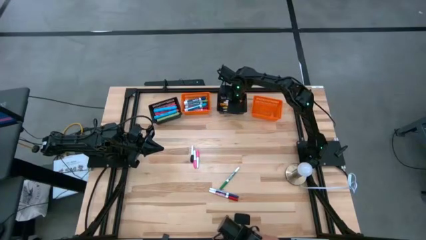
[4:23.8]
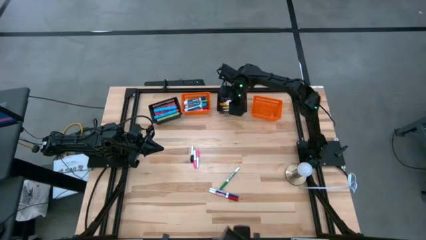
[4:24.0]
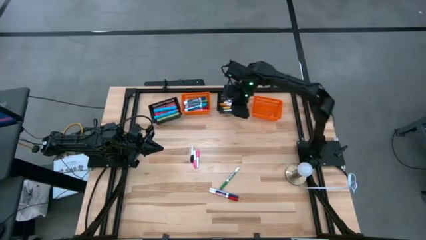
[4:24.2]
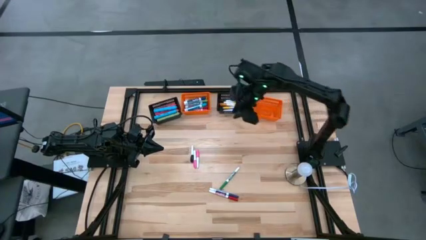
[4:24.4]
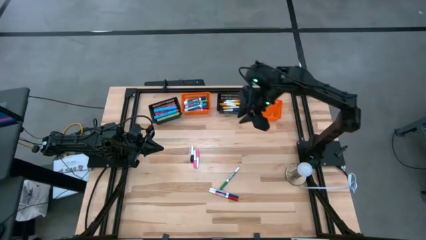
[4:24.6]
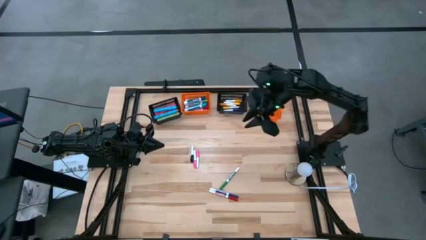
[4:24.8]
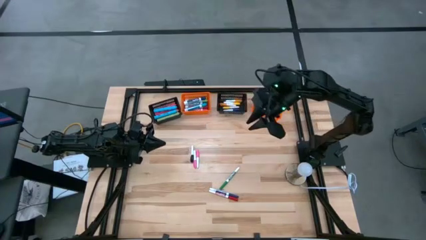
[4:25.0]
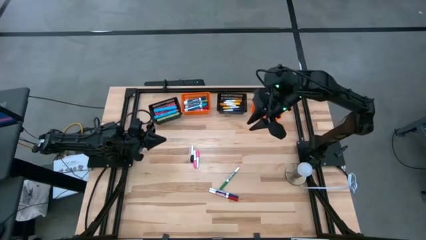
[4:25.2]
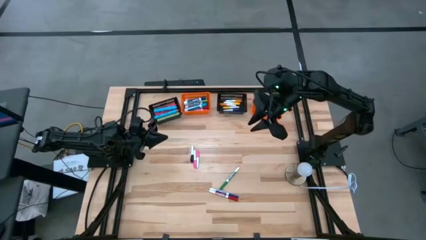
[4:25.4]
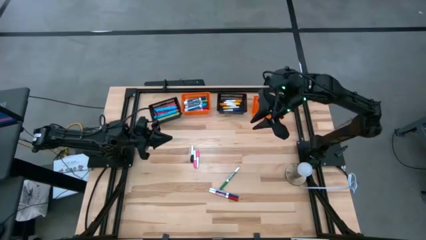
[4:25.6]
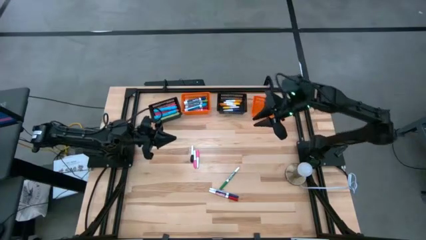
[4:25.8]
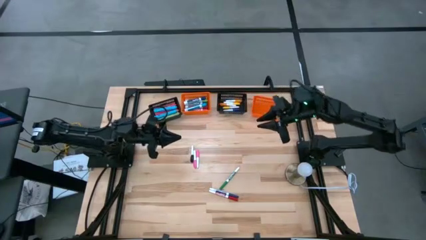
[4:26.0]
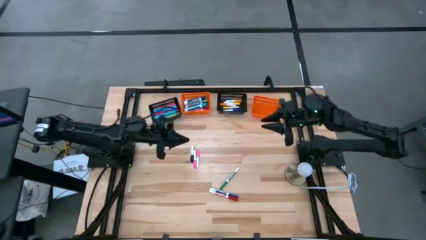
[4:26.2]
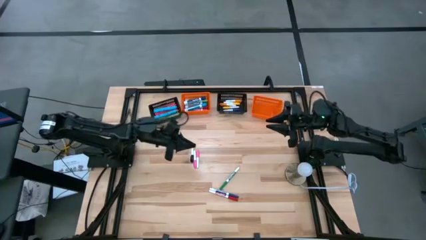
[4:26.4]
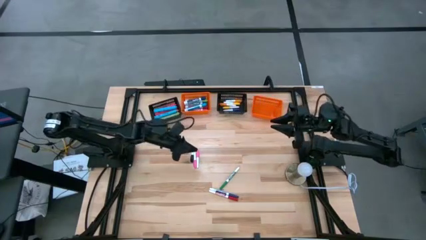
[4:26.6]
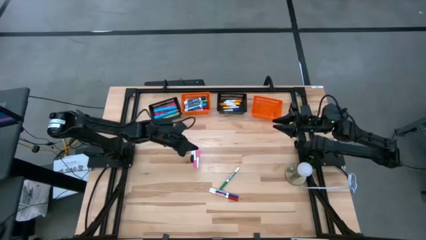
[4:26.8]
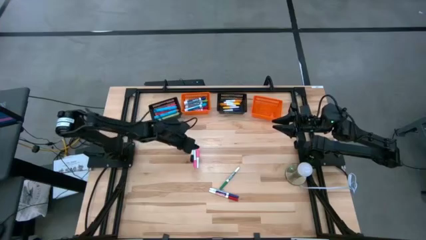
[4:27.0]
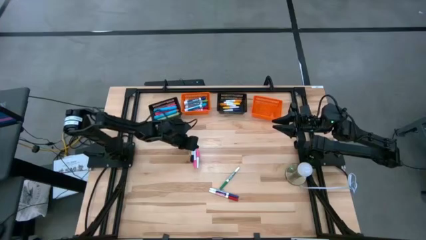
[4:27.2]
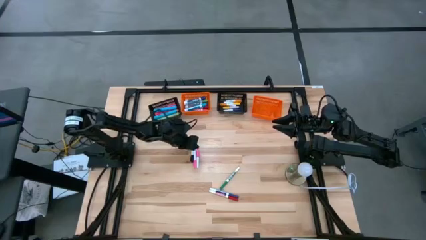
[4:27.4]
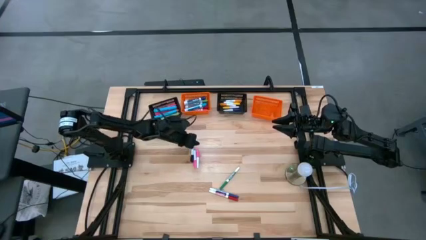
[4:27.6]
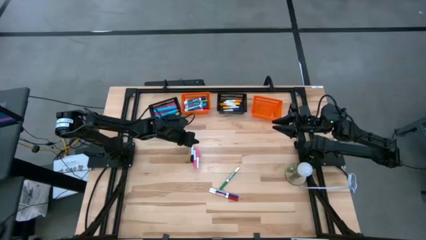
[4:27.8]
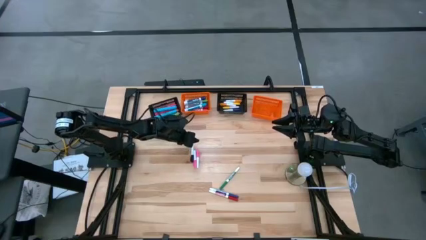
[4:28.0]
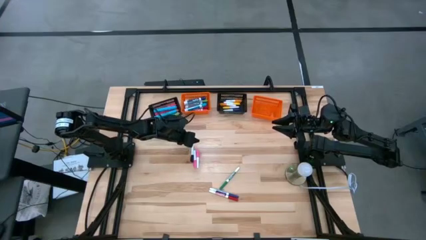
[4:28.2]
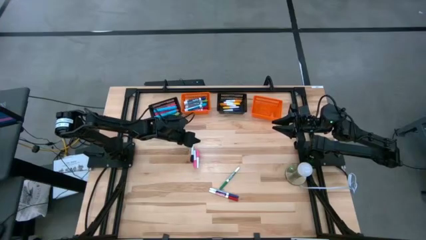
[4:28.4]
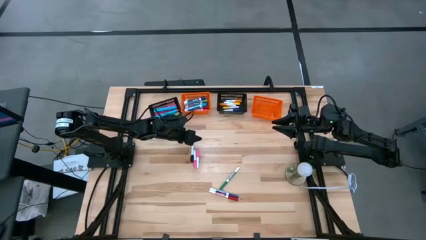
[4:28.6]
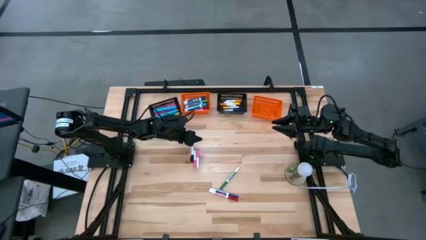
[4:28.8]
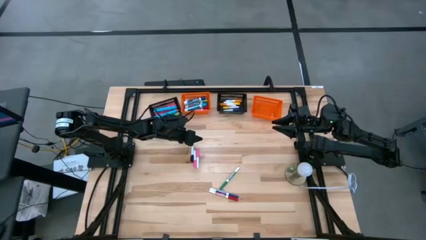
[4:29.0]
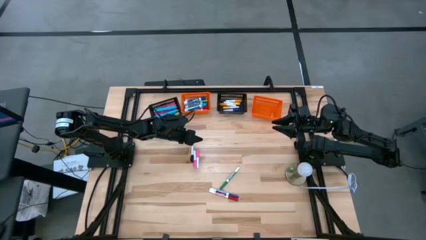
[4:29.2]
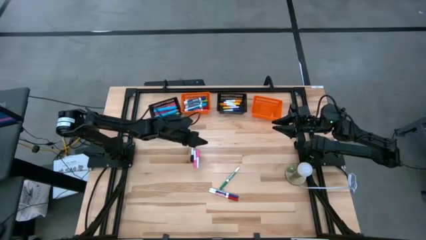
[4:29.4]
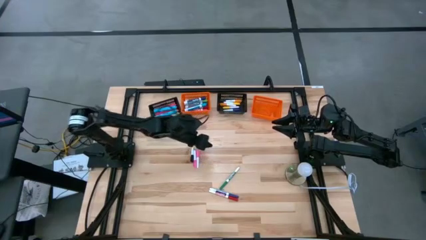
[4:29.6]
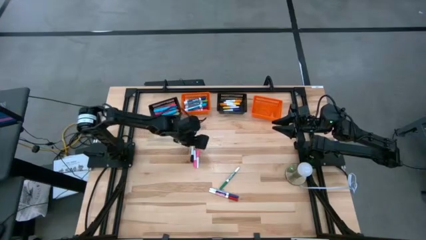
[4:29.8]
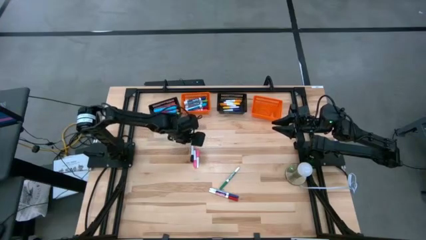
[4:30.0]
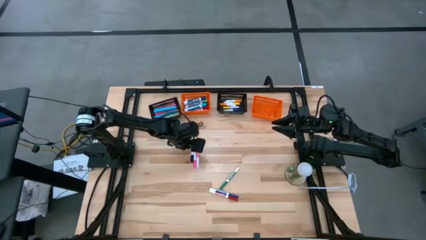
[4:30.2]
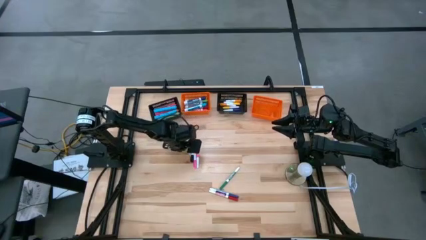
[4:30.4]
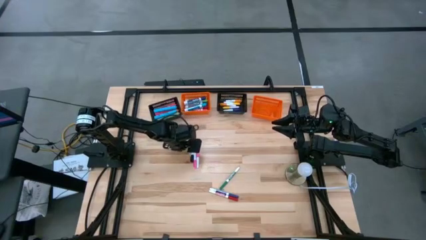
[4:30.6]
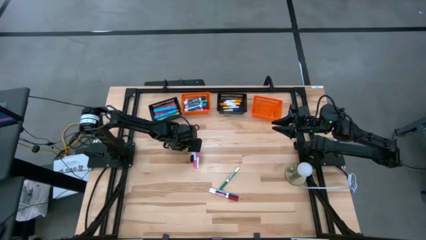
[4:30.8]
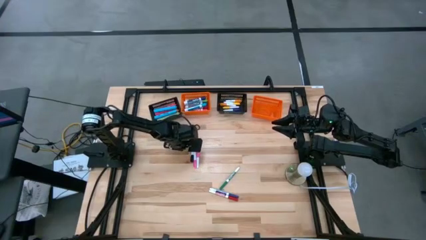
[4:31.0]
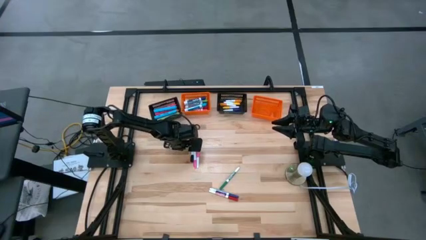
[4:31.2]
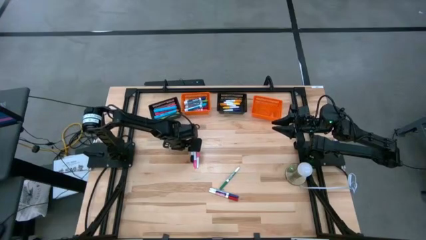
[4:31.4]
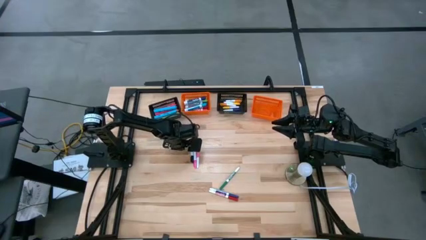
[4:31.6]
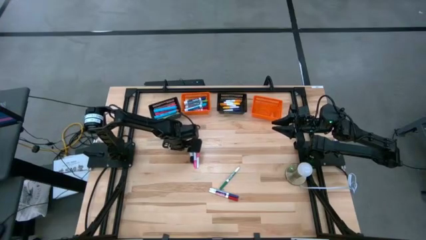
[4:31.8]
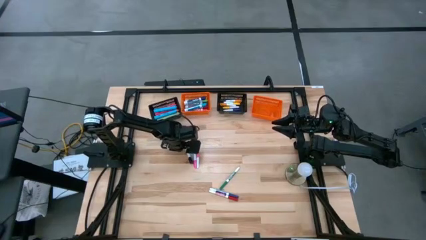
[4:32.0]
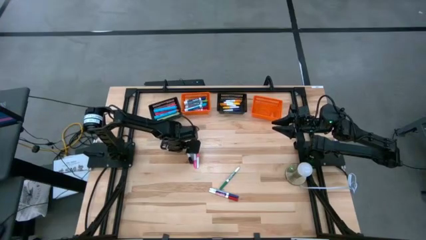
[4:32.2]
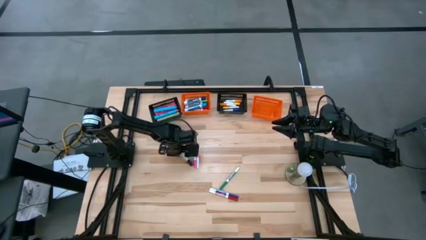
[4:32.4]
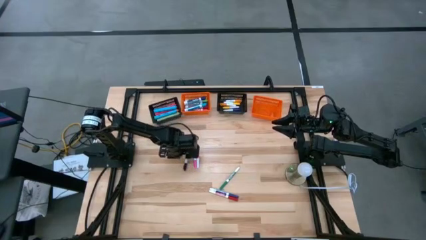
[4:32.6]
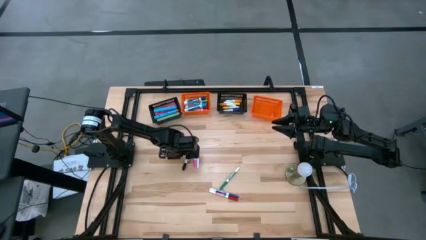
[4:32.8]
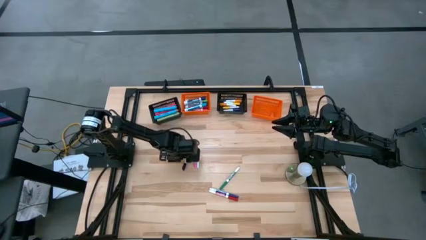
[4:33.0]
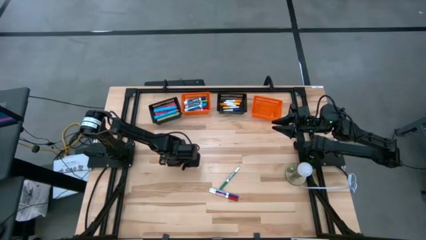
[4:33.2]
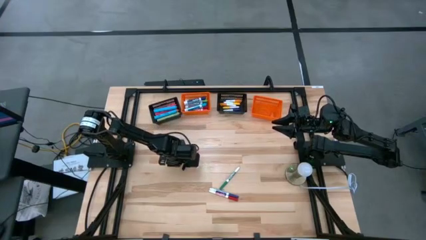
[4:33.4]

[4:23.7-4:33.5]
Task: Pick & Place Markers
Put the black mini highlighter pen into the right black bin

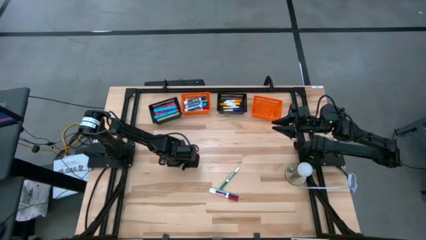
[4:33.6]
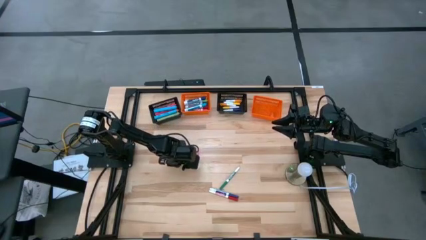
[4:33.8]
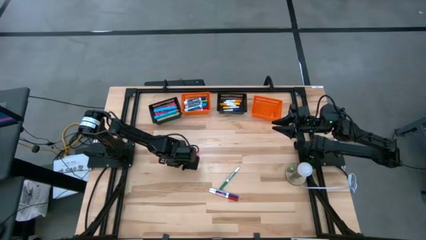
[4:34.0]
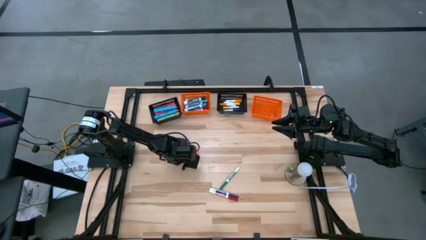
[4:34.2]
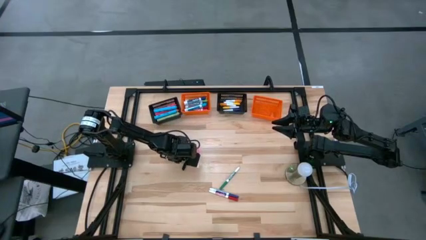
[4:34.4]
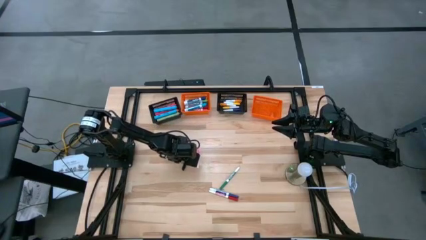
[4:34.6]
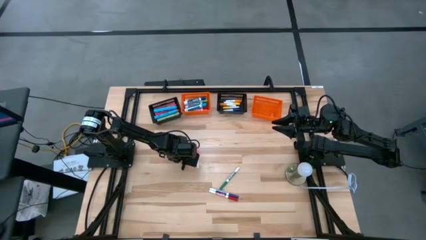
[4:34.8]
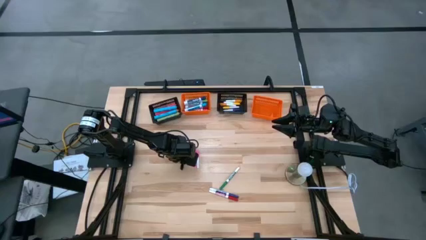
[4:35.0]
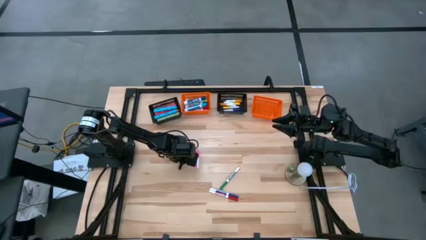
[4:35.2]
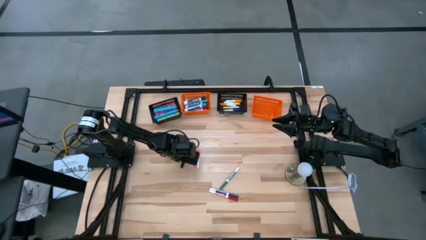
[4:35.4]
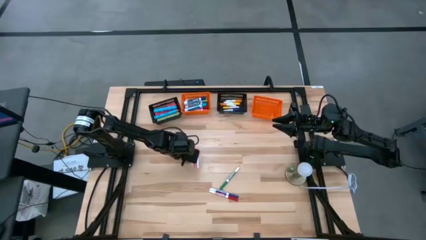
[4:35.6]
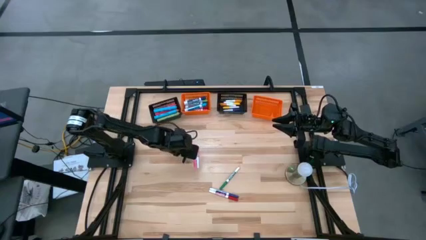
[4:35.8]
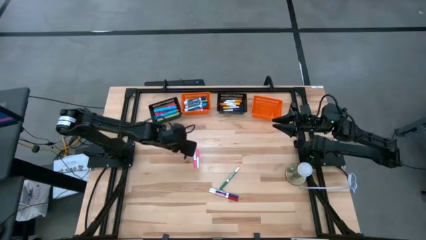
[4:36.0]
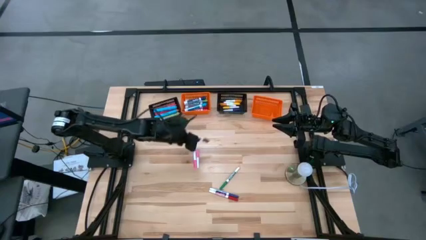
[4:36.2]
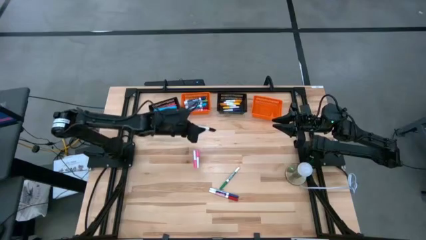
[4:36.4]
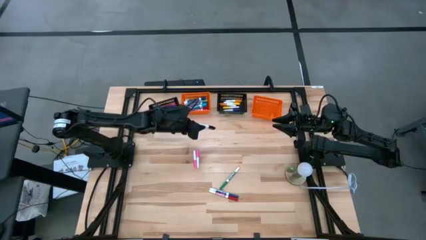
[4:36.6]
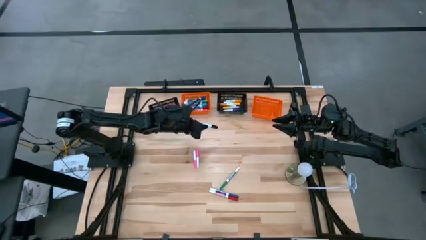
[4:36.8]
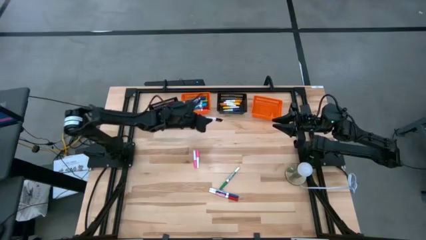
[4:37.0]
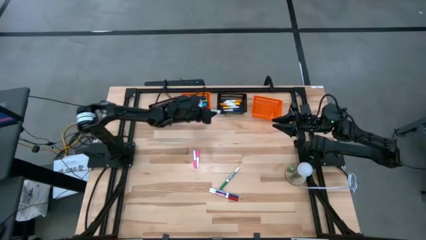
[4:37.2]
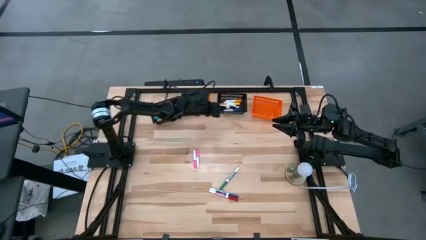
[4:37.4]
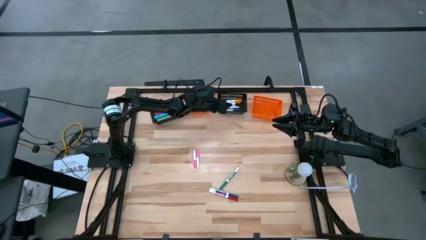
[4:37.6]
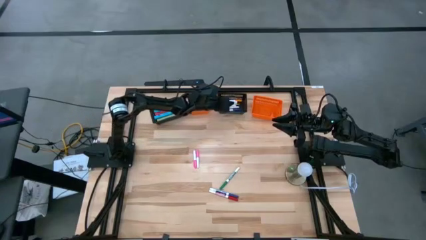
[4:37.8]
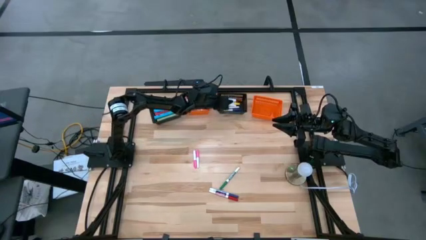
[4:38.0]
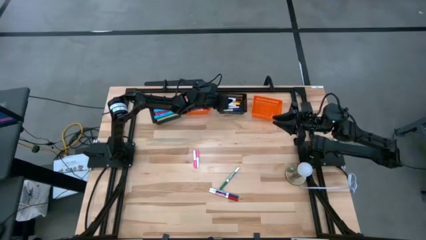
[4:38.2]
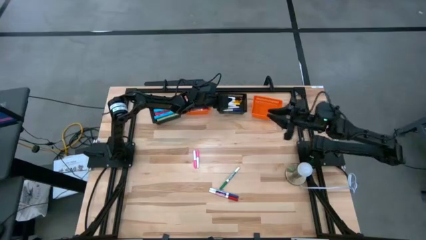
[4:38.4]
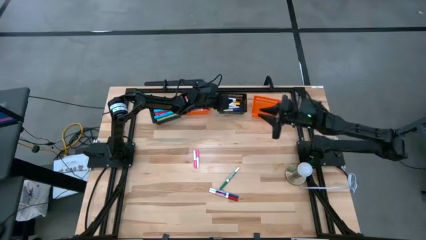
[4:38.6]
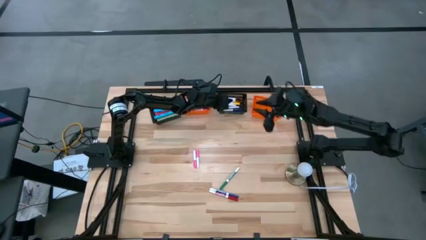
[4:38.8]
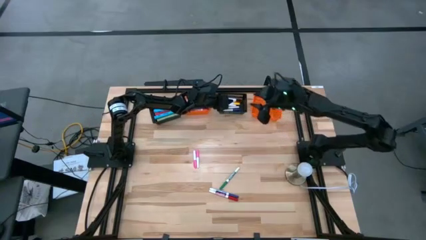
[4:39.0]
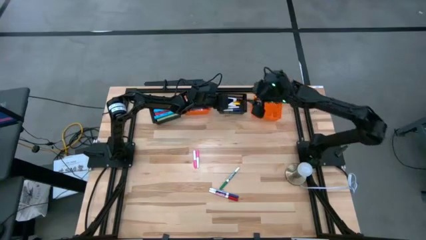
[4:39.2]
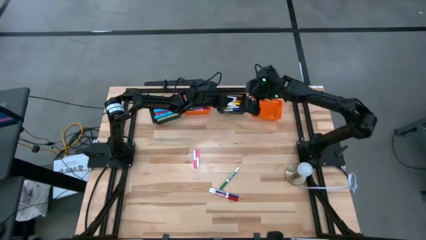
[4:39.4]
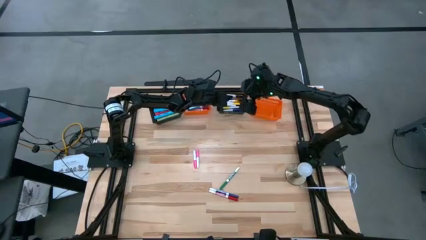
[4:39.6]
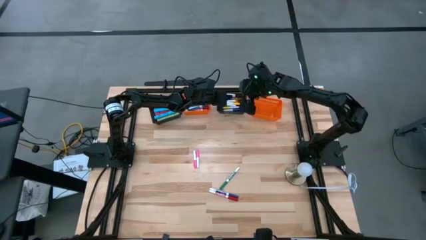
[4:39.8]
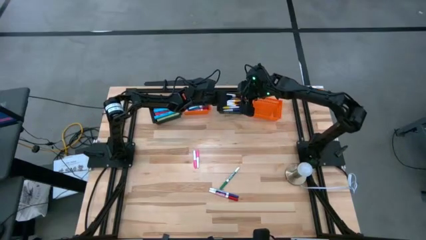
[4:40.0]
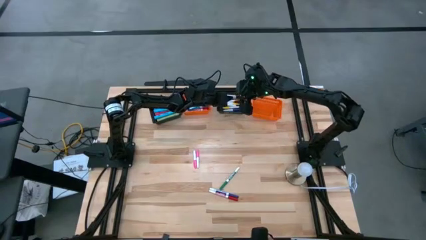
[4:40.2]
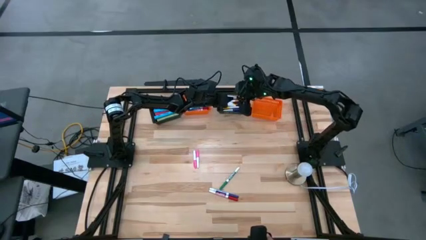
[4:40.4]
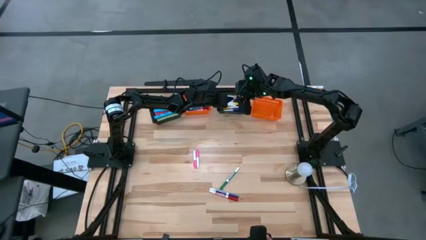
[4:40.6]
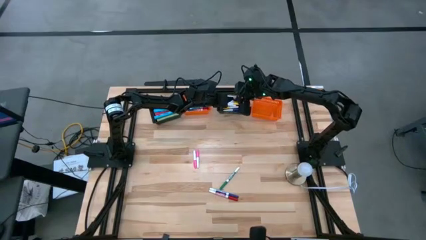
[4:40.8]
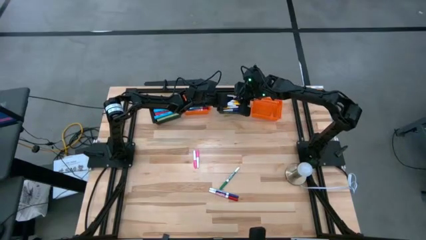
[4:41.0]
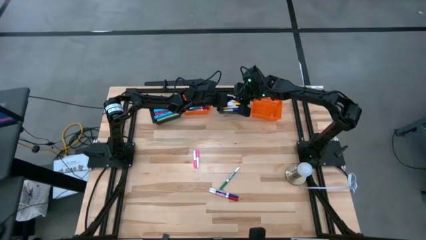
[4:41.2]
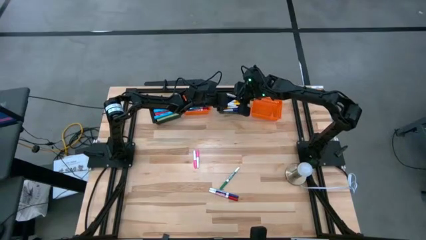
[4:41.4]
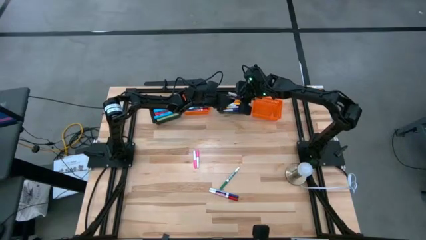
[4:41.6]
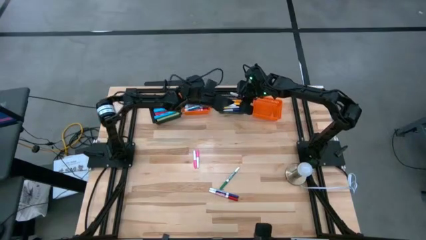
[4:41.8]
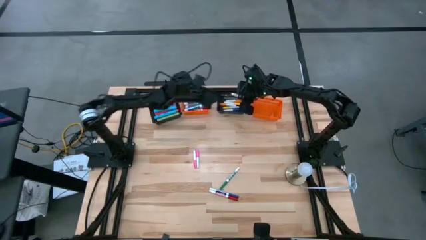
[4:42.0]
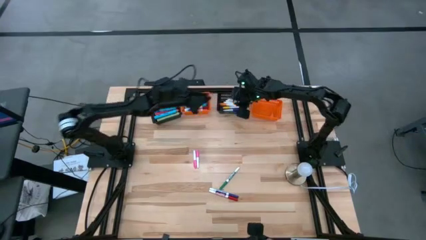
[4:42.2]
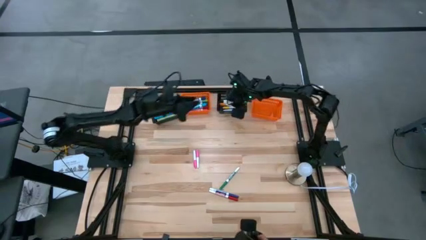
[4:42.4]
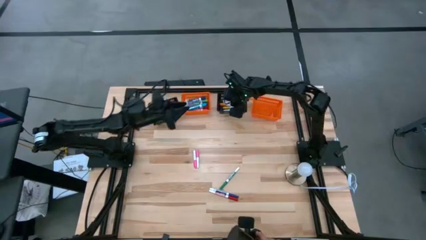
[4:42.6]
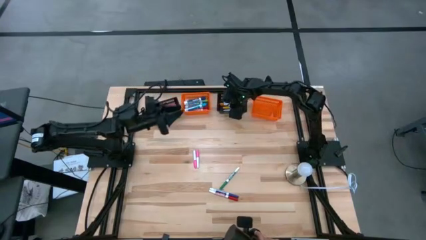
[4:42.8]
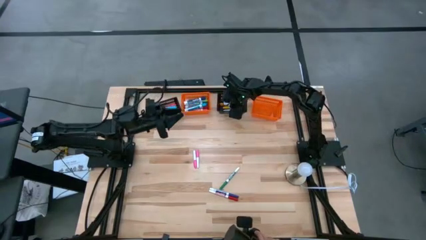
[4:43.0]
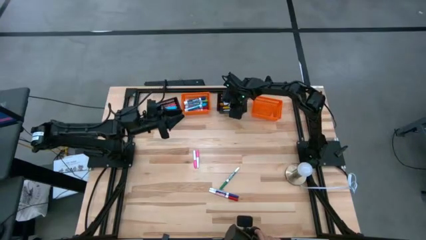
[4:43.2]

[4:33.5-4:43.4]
Put the black mini highlighter pen into the right black bin
